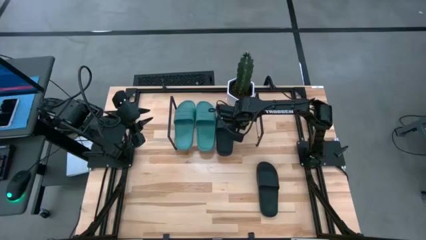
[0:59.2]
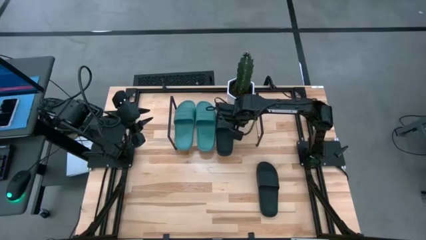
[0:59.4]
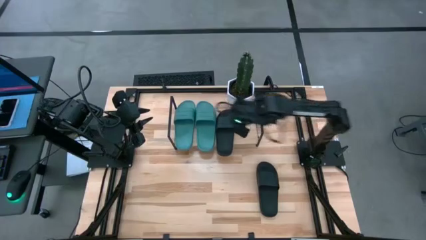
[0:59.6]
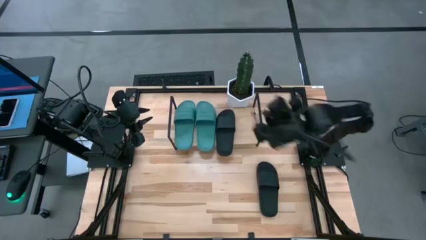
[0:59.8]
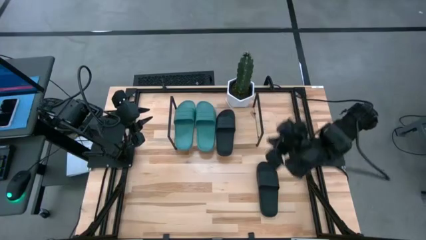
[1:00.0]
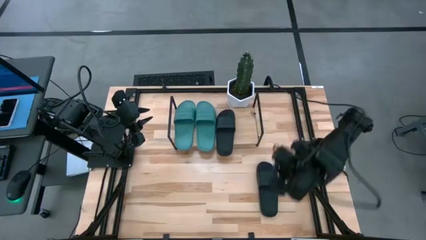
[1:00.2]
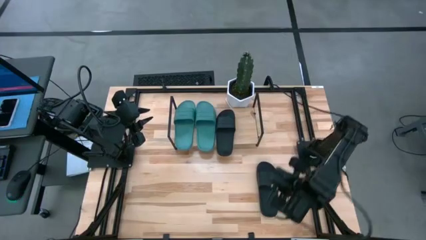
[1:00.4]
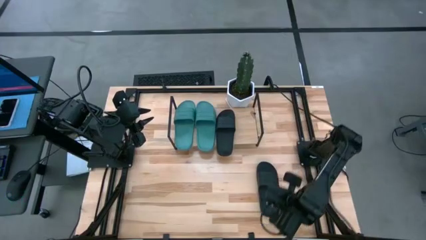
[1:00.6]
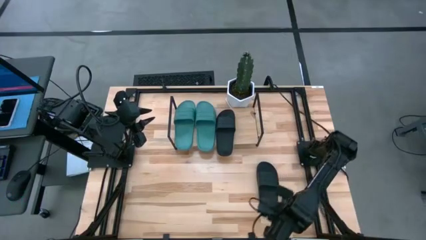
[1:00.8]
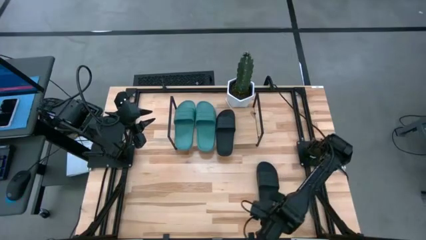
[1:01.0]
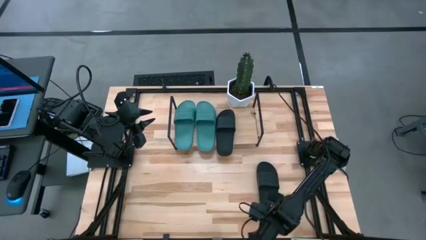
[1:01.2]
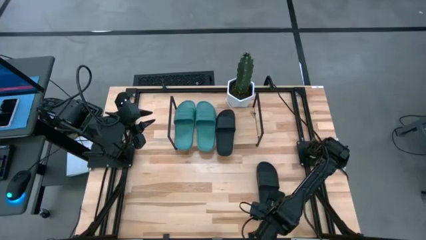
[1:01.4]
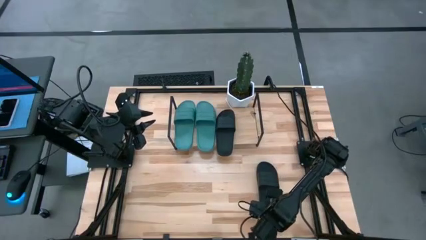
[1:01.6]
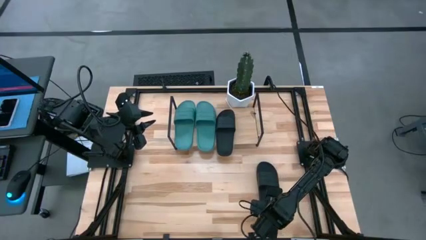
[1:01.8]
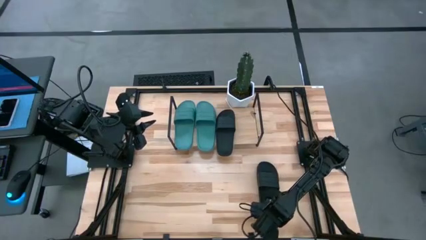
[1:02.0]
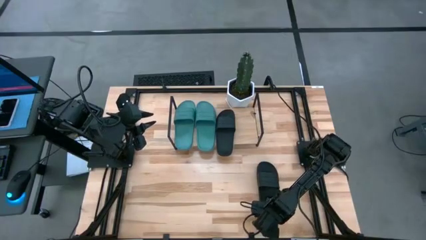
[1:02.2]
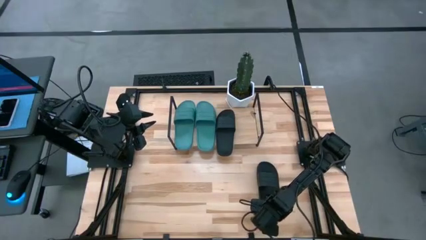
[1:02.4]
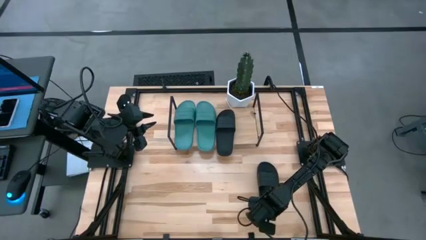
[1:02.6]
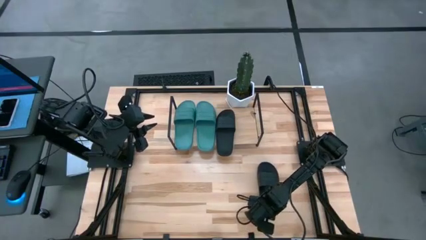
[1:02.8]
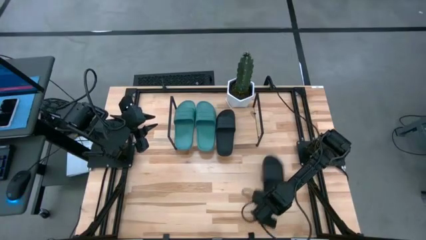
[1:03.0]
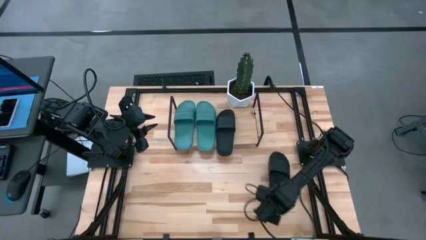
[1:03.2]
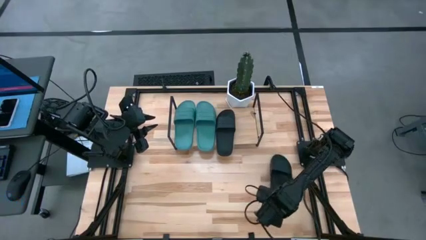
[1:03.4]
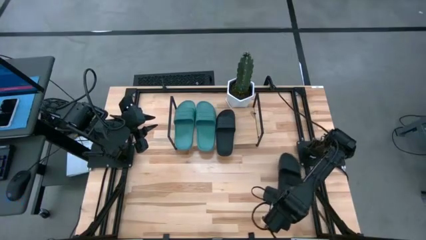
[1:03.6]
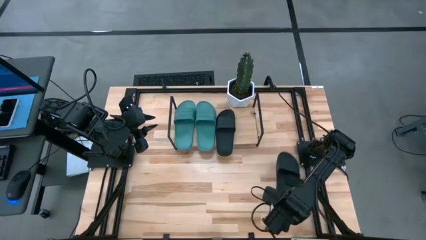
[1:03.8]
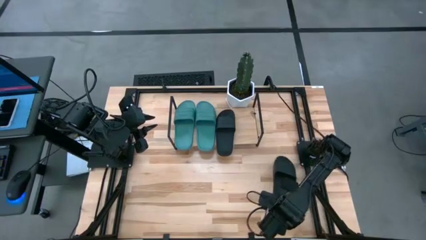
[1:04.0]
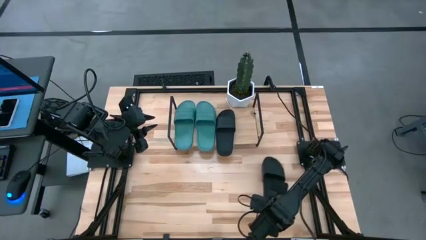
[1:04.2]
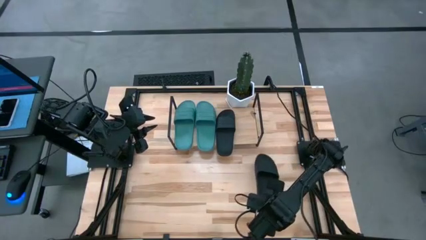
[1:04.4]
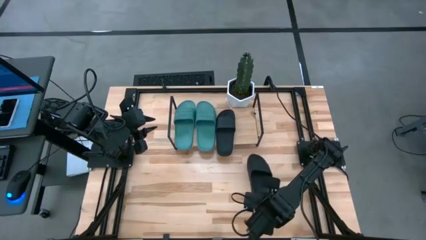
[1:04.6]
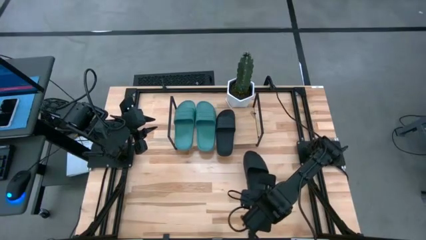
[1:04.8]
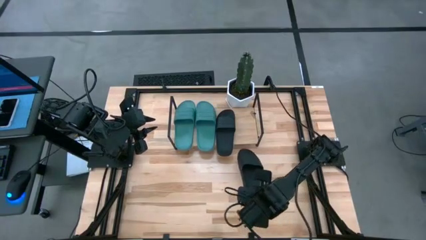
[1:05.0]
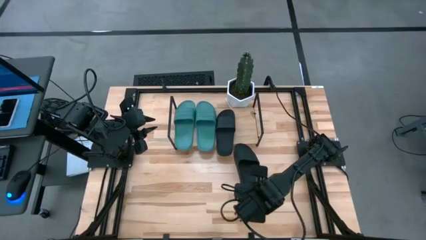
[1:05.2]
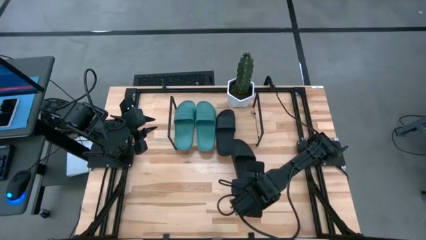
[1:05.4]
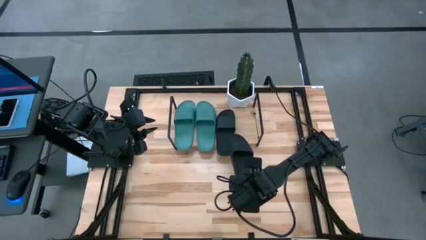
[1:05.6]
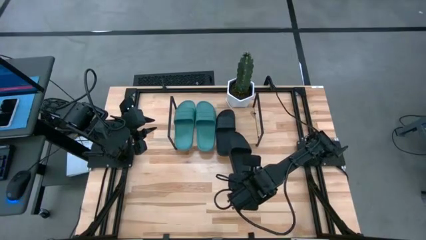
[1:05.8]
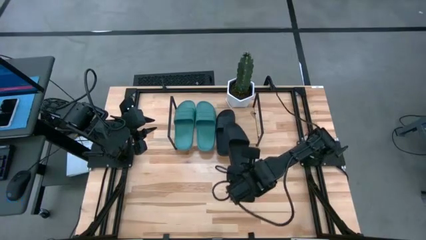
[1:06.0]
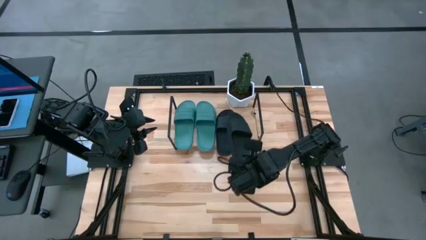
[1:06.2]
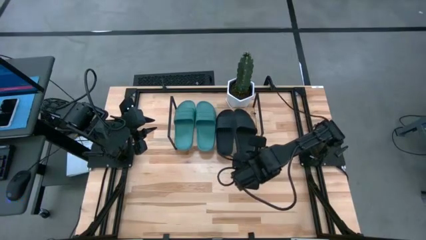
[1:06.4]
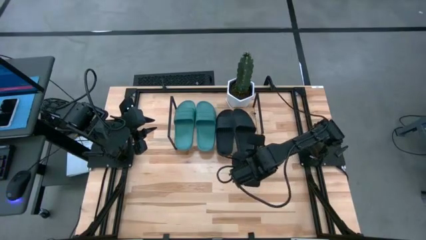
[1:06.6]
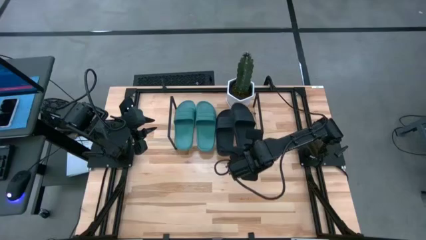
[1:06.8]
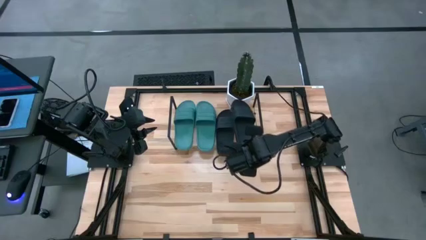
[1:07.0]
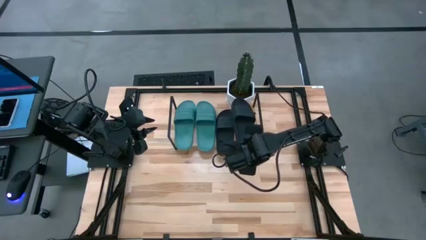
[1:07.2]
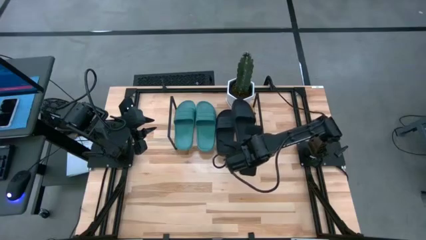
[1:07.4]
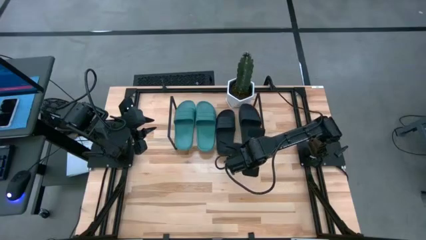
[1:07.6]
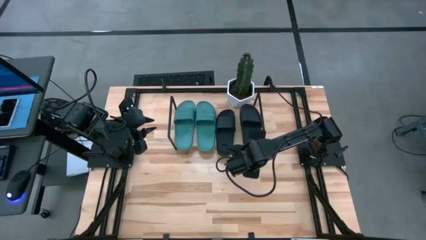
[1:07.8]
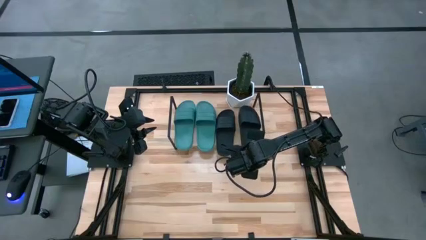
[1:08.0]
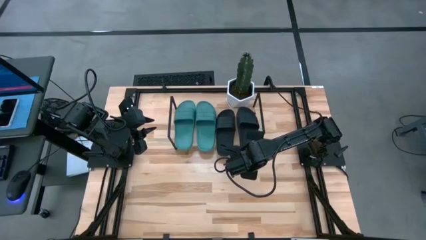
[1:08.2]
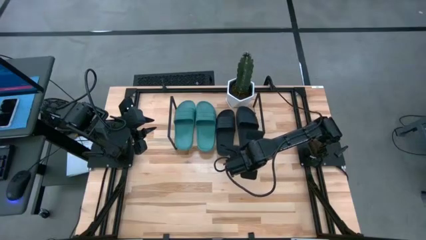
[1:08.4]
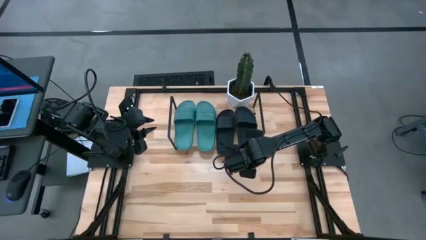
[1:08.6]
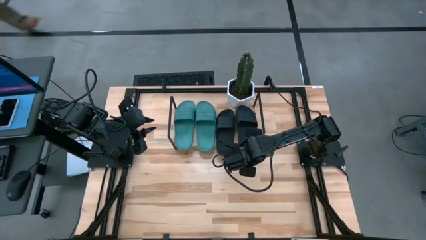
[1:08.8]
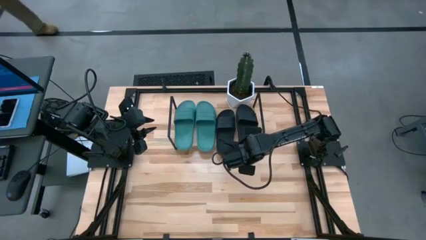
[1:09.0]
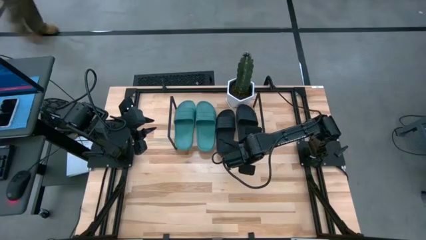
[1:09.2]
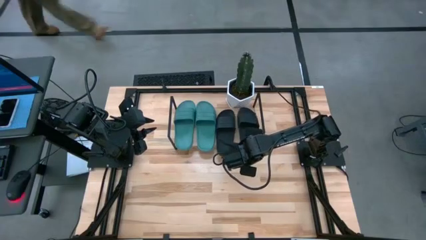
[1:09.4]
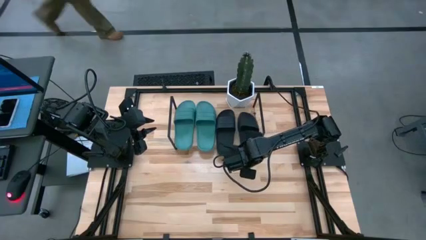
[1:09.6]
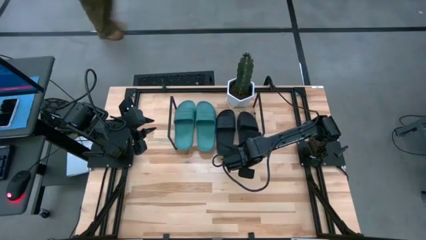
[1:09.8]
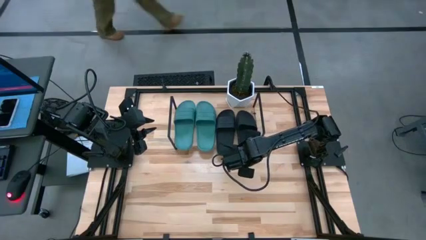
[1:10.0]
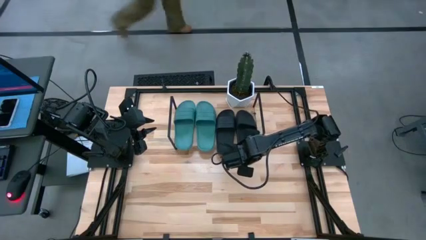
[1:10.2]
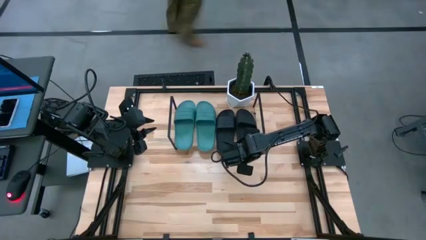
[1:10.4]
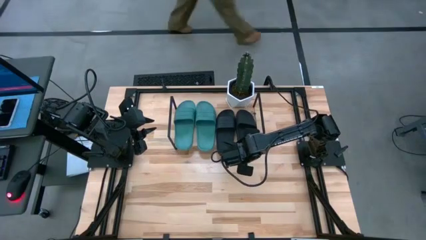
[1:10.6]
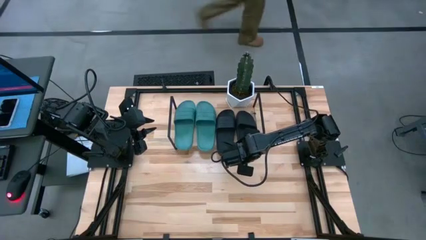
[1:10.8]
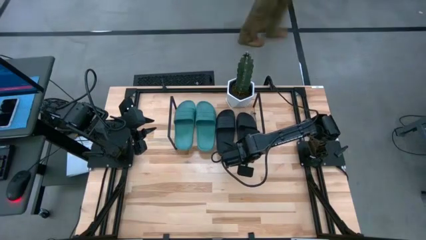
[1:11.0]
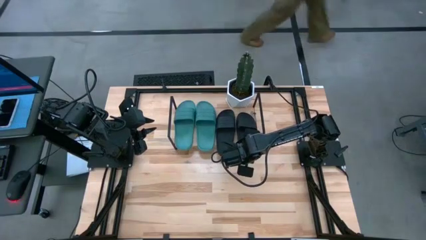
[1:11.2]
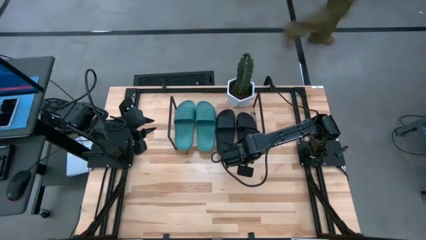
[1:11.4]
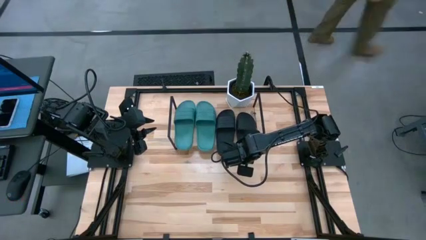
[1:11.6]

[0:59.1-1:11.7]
Task: Pick and place slides into the shelf
Put the black slipper on the shelf

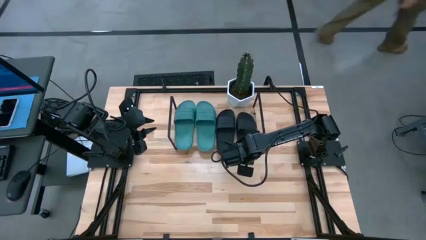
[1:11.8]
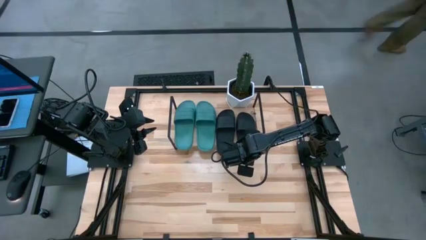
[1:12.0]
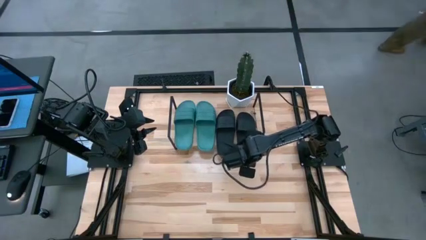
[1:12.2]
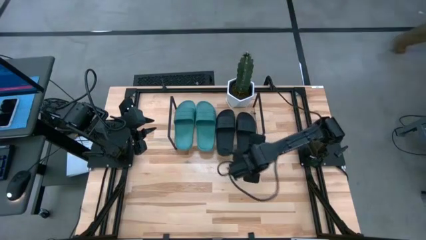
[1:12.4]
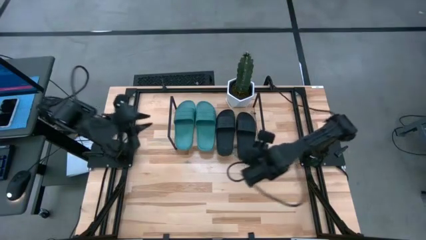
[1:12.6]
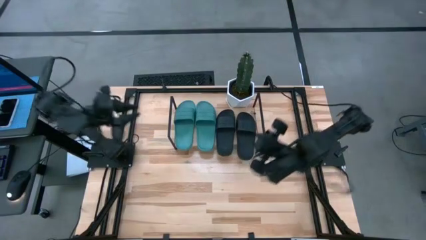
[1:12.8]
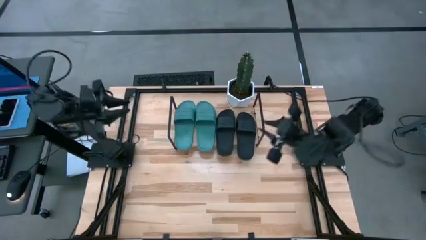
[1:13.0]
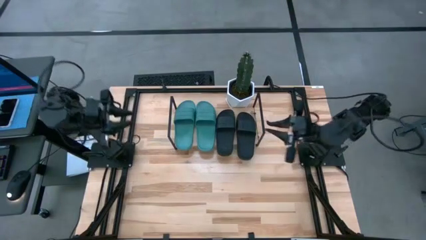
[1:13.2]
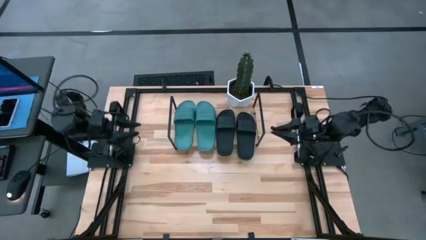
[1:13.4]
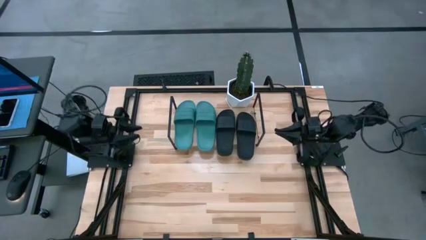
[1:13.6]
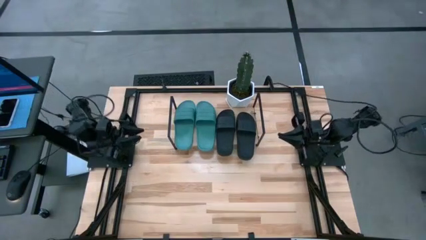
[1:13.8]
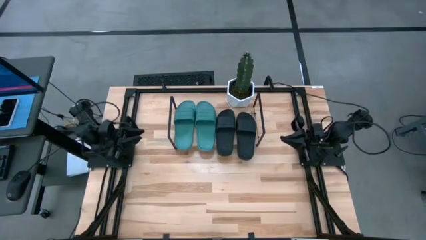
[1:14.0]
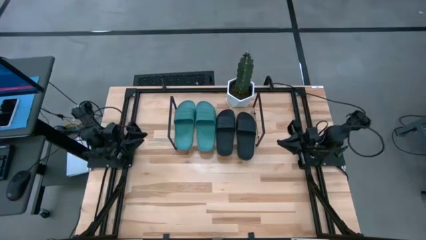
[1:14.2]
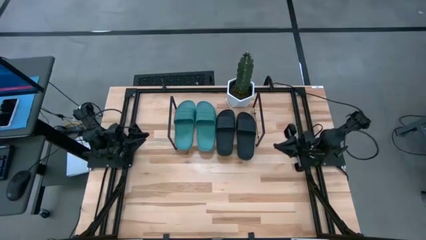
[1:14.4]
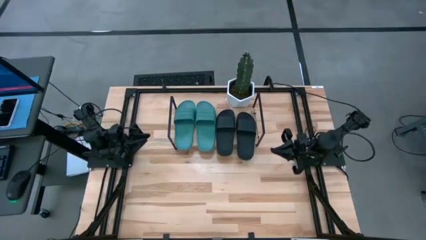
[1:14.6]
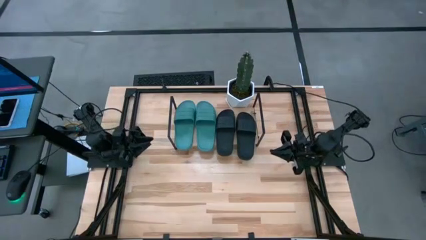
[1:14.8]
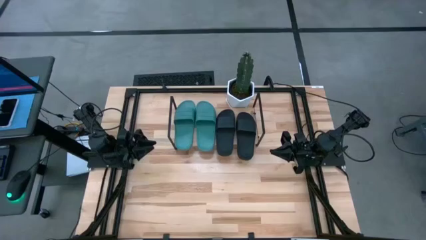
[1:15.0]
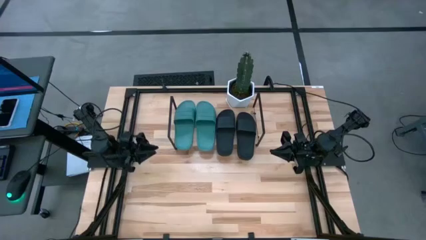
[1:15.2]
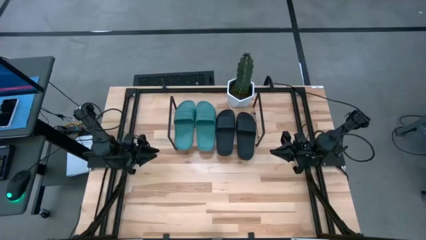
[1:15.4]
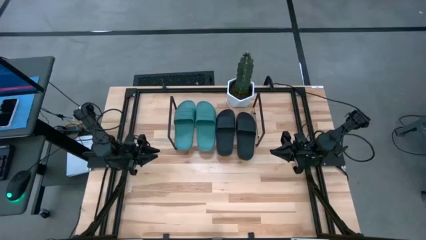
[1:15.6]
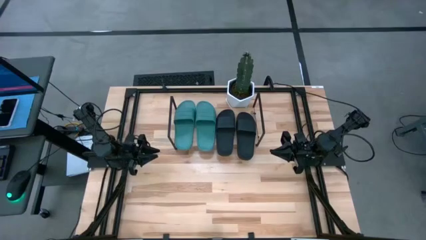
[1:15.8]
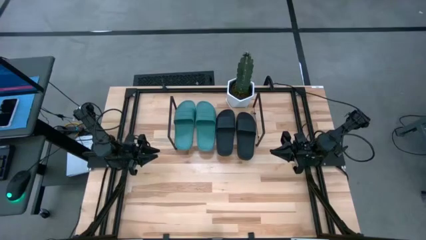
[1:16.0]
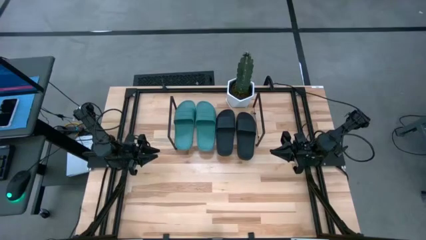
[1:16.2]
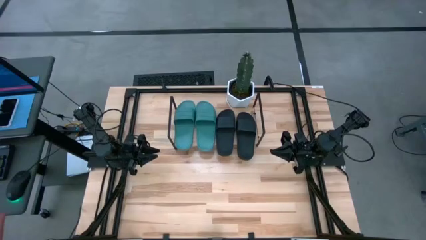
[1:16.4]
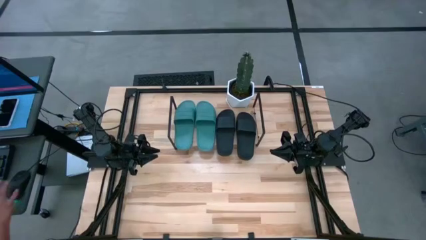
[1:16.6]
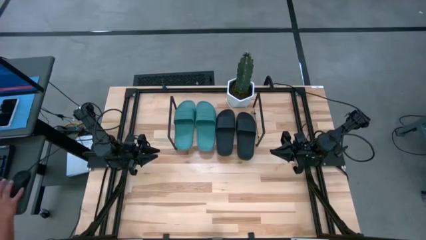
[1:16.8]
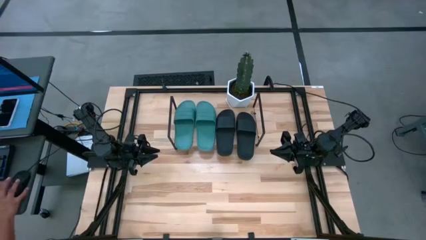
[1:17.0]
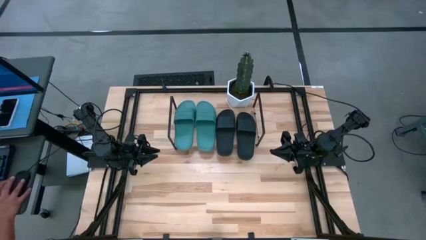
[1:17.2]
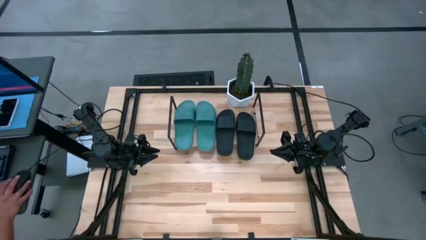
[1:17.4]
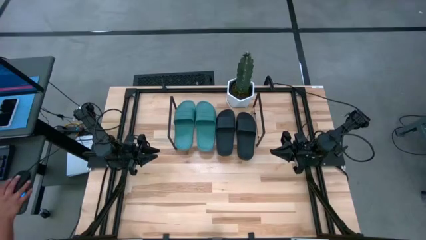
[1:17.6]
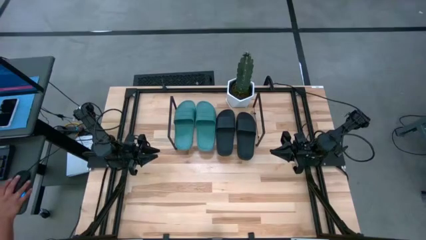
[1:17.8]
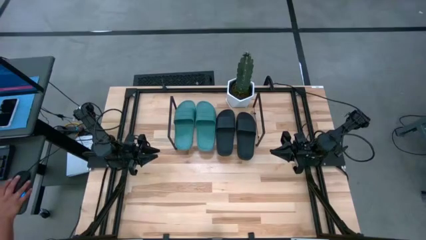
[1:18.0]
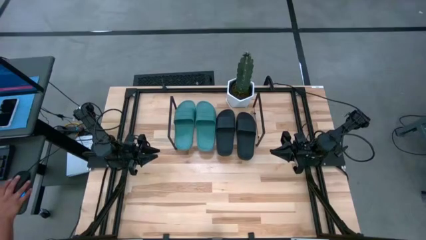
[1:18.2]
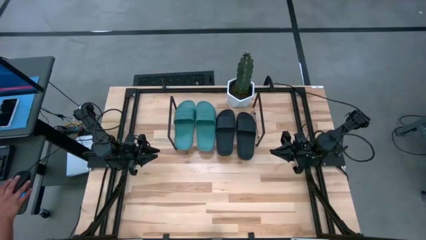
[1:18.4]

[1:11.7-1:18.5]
Return to Home Position
